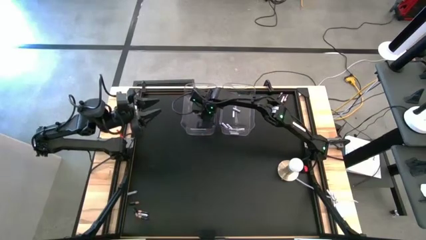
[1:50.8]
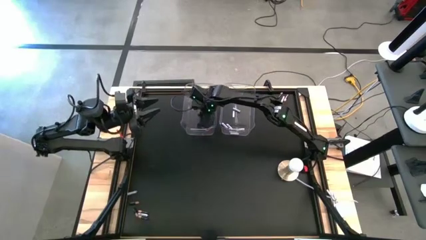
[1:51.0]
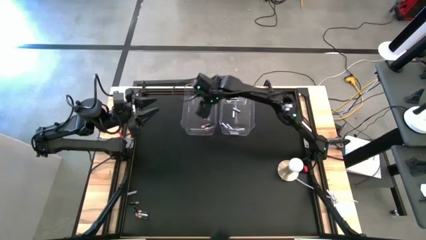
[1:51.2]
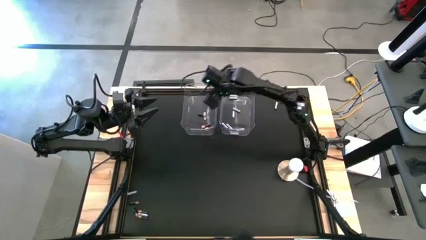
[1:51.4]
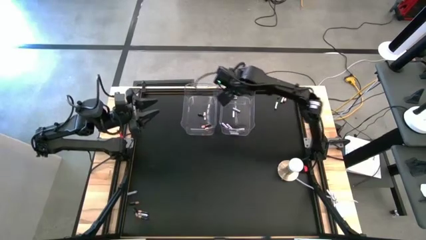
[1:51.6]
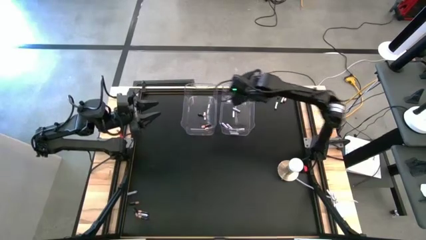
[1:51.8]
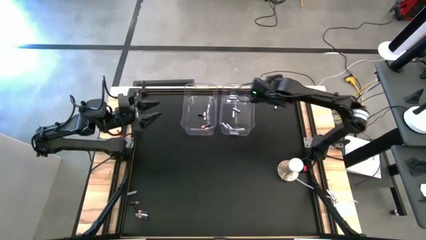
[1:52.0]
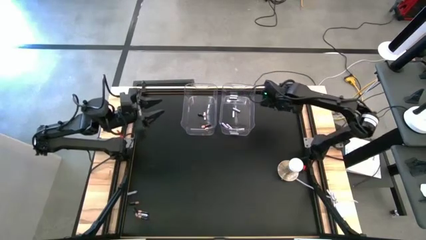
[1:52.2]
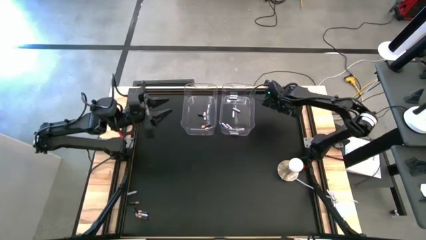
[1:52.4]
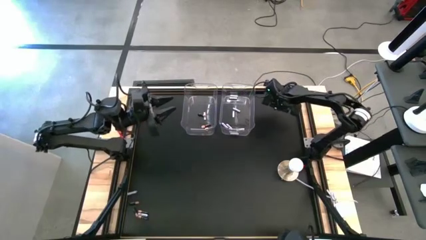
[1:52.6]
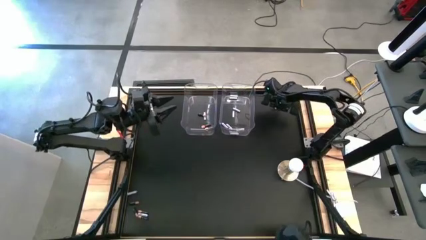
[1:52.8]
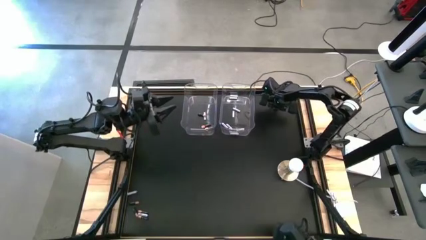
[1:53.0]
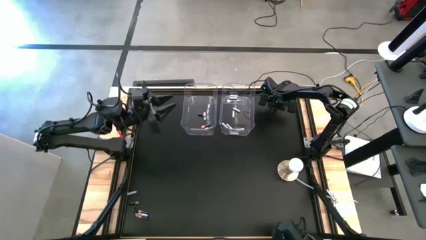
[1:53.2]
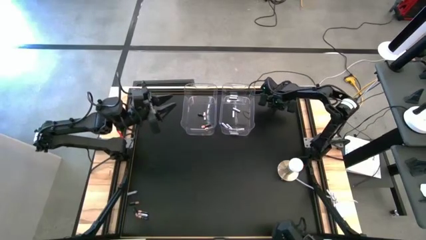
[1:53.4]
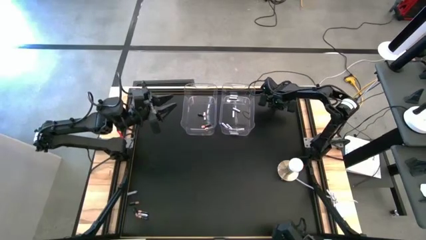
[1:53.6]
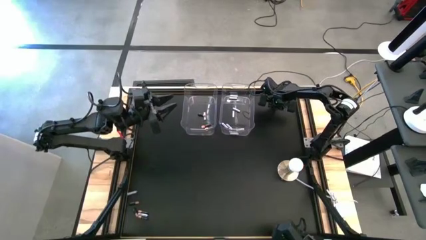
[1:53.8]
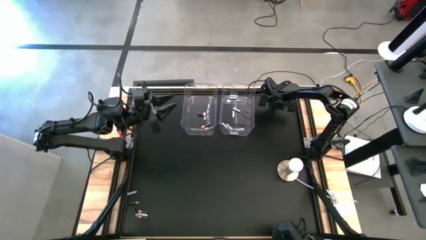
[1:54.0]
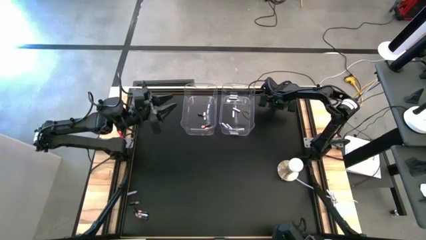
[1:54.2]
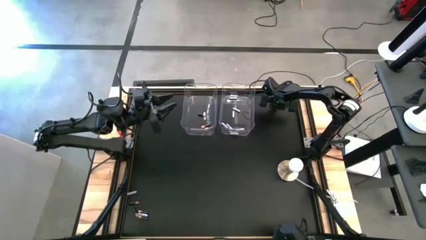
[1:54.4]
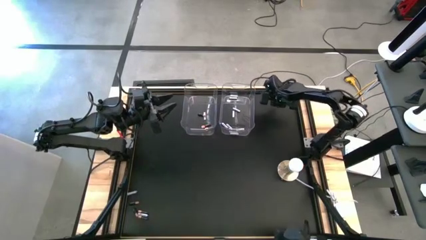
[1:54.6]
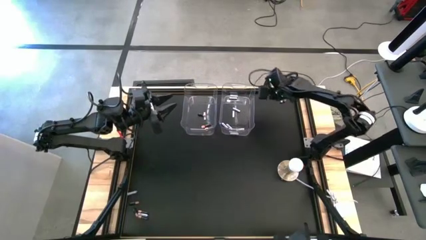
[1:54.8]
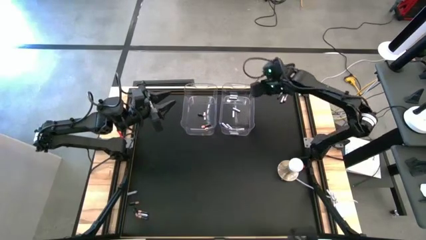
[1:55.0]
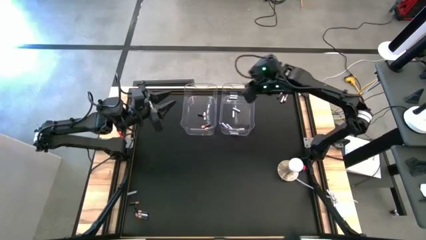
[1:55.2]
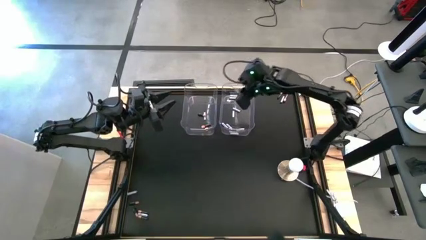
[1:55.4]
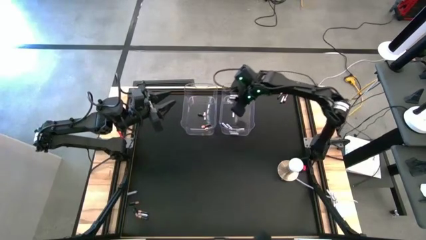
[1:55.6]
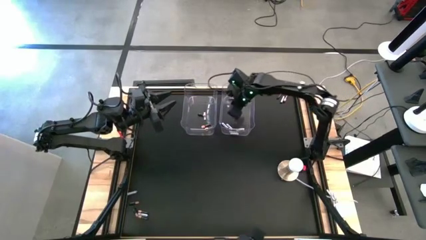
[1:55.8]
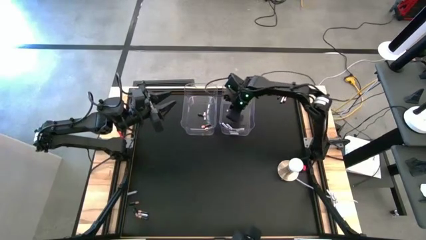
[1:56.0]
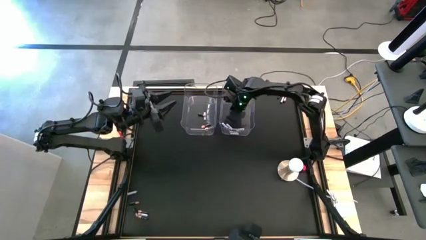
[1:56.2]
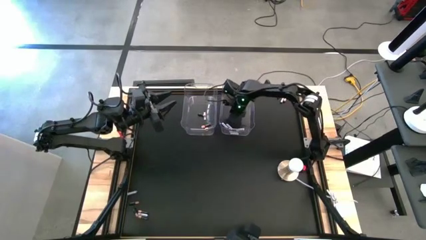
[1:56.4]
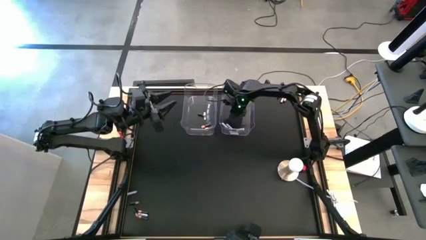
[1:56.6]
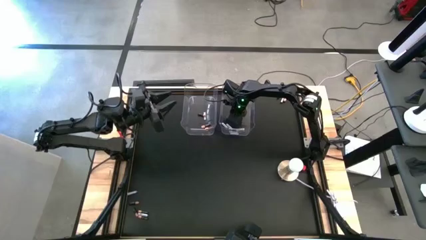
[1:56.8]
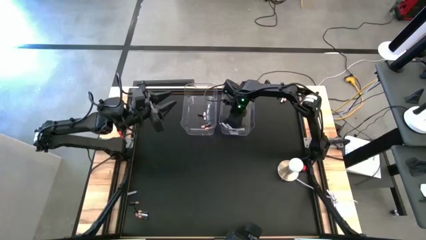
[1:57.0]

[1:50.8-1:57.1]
Task: Sort batteries
Put the white battery into the right transparent bin

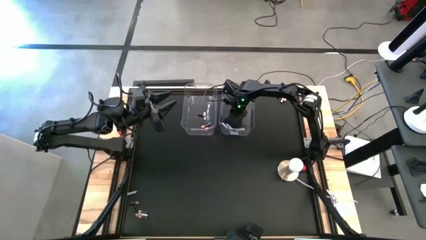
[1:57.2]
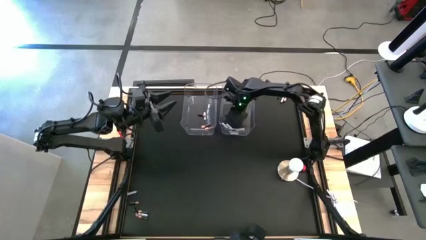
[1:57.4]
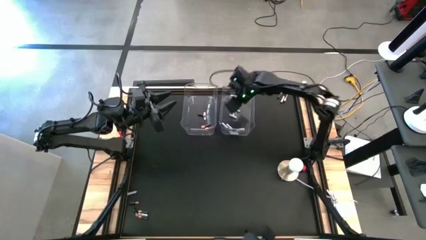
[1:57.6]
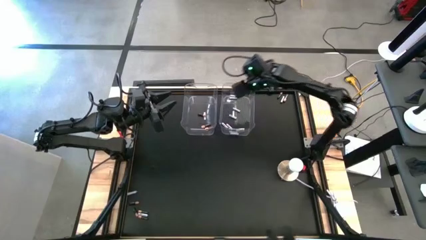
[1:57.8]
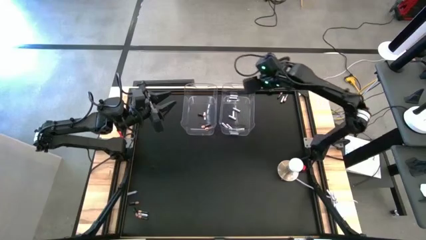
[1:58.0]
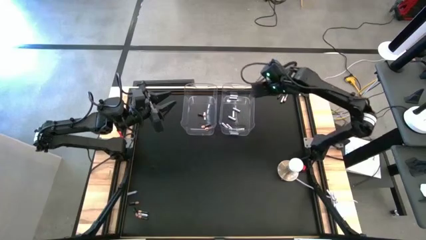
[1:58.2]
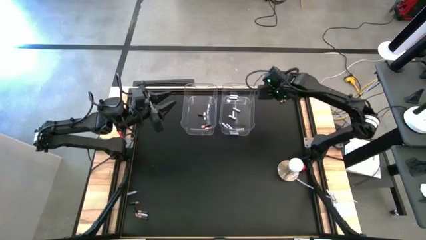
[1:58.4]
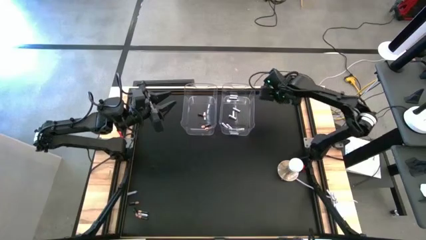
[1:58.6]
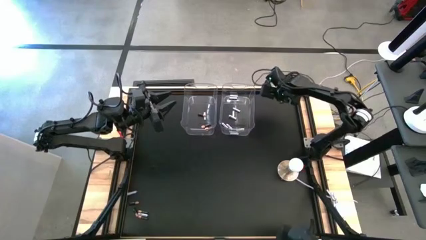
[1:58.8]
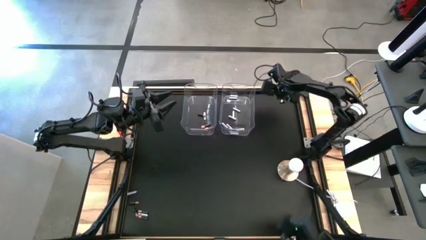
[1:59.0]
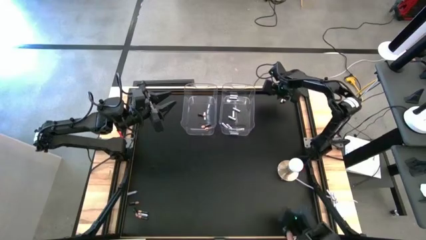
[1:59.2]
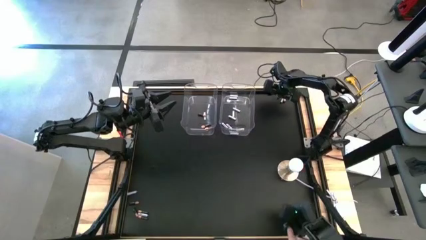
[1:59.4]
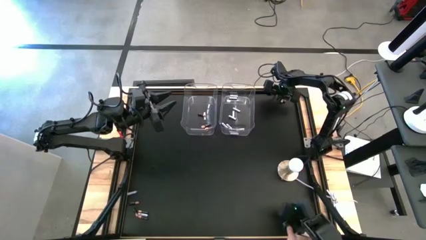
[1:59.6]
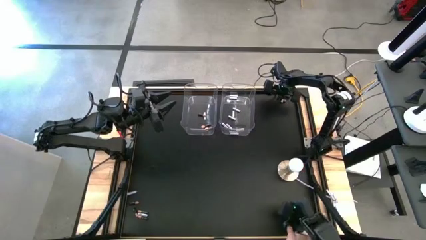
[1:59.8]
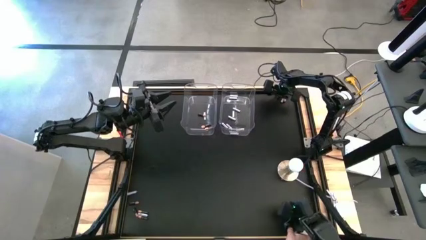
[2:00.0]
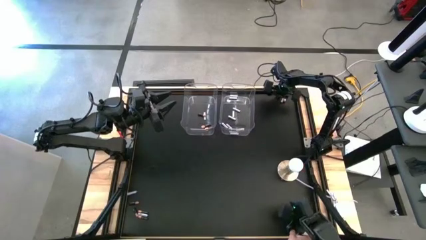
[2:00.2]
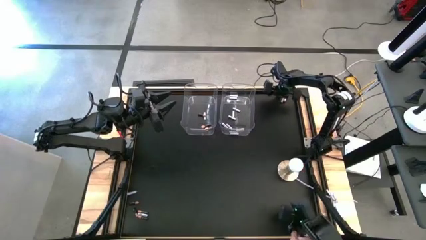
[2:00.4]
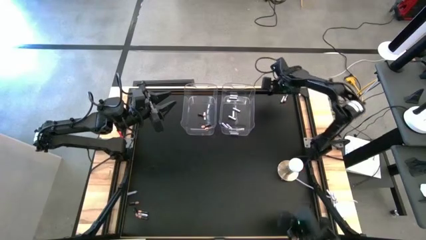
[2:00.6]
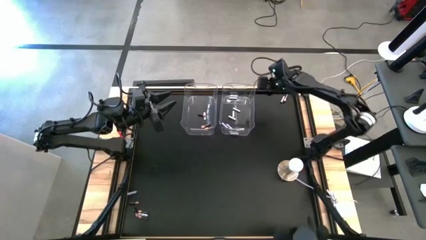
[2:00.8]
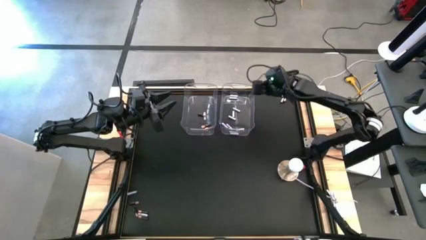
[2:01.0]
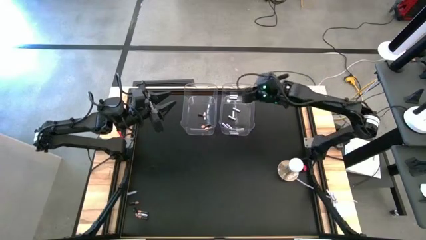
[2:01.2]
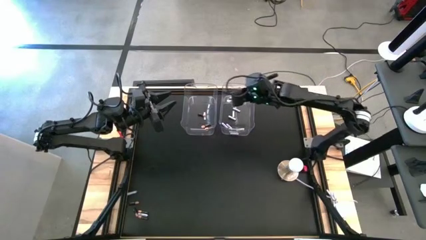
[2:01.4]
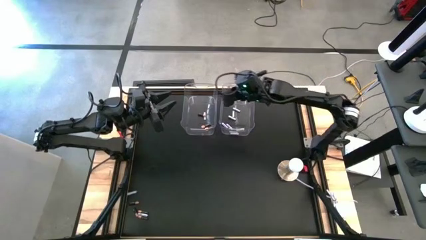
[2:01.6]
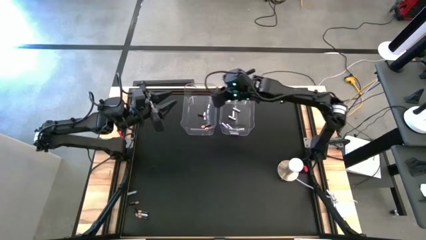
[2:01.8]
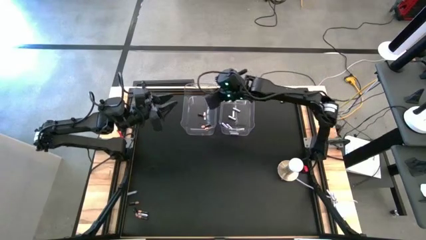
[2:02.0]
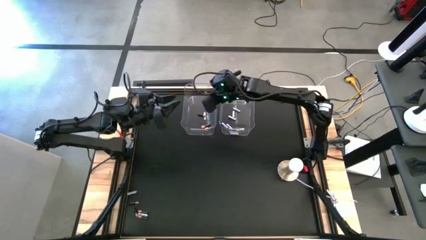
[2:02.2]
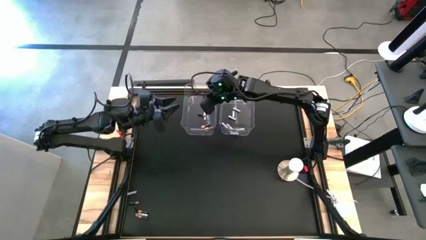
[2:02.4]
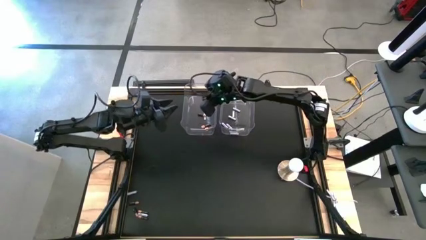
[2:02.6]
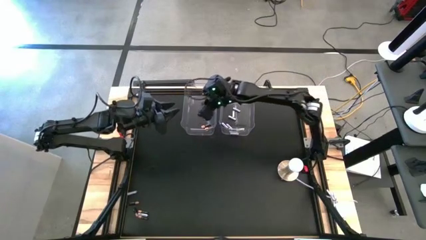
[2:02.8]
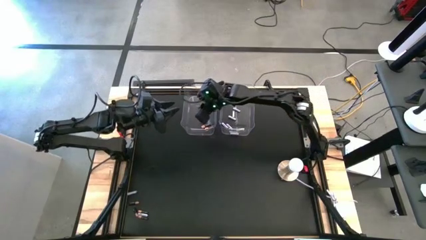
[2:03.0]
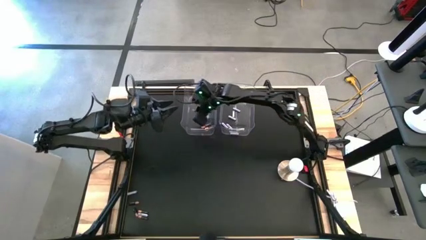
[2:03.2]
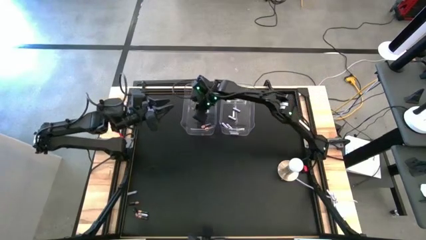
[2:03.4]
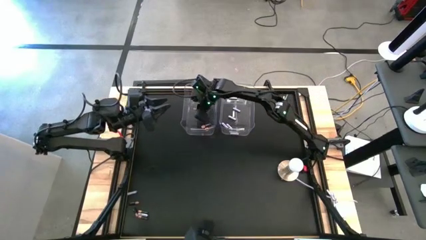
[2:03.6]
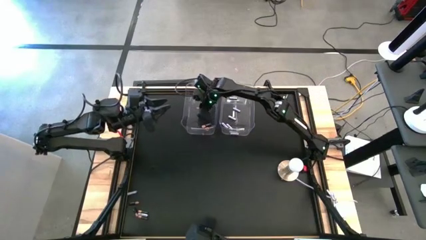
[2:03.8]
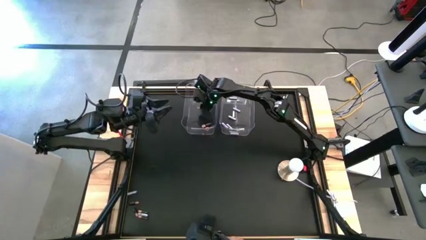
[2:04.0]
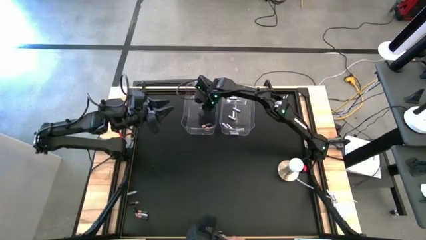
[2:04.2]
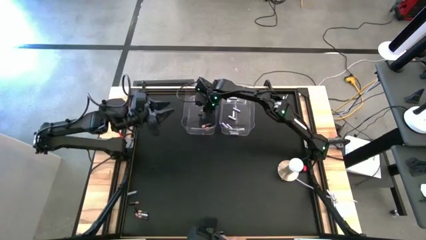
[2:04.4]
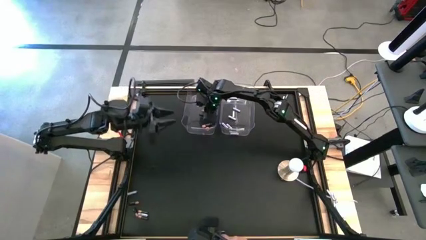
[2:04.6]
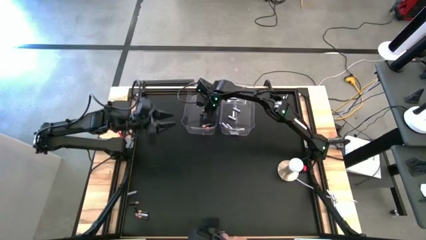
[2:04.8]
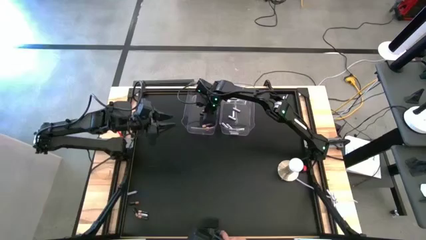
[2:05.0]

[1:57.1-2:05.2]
Put the black battery into the left transparent bin

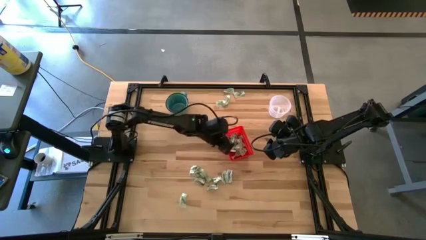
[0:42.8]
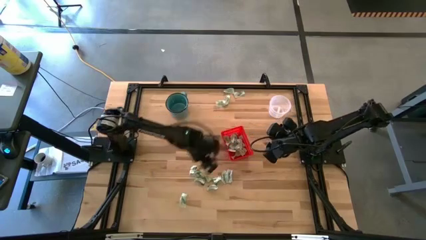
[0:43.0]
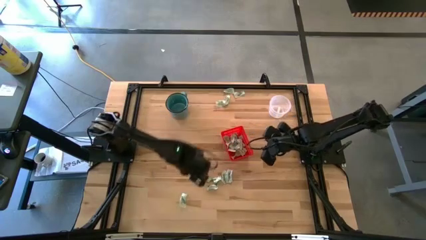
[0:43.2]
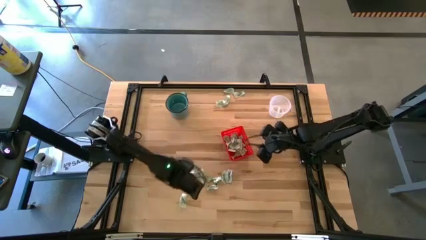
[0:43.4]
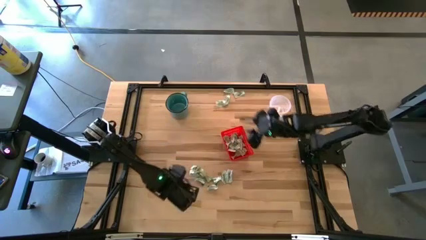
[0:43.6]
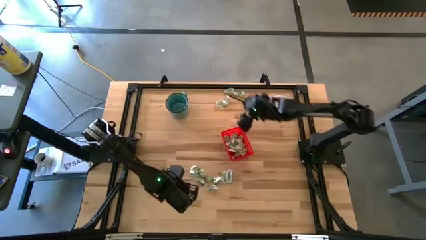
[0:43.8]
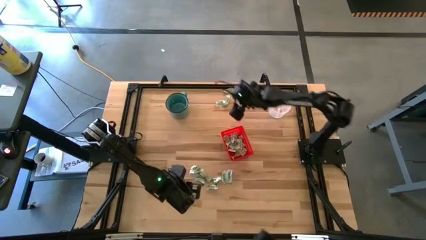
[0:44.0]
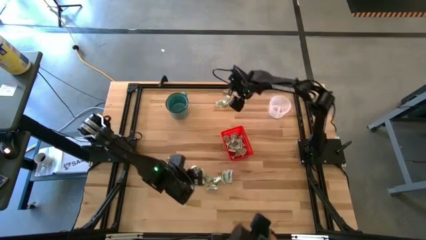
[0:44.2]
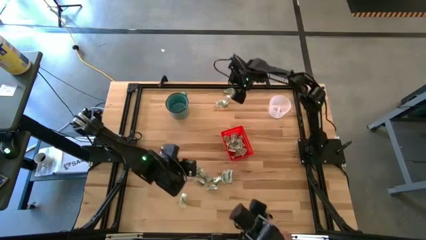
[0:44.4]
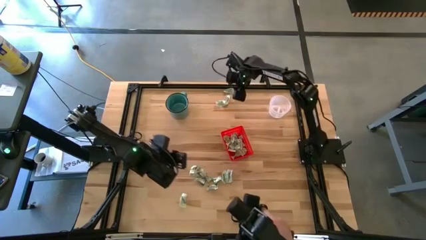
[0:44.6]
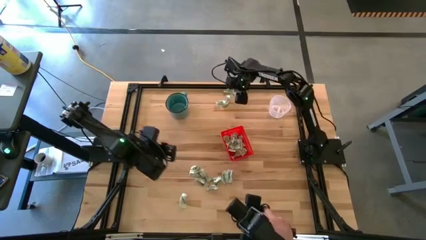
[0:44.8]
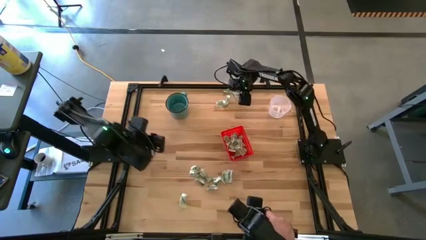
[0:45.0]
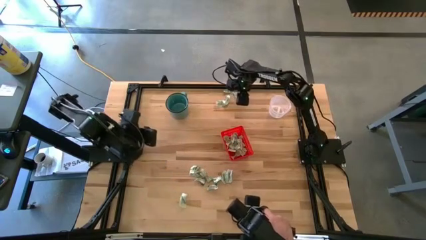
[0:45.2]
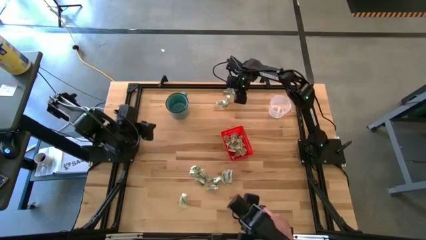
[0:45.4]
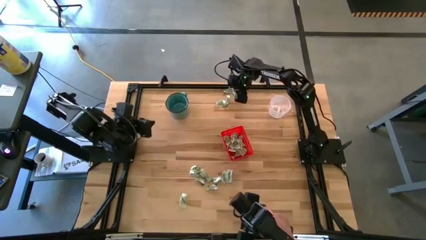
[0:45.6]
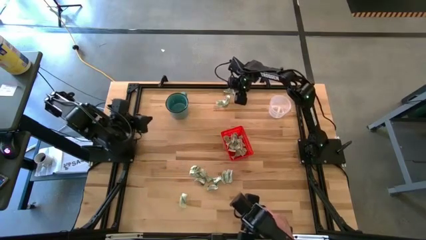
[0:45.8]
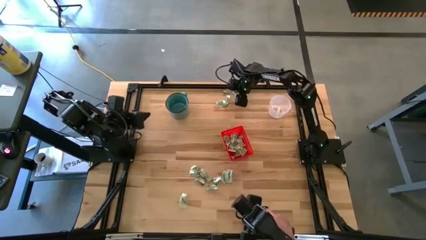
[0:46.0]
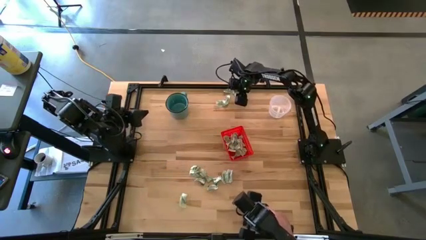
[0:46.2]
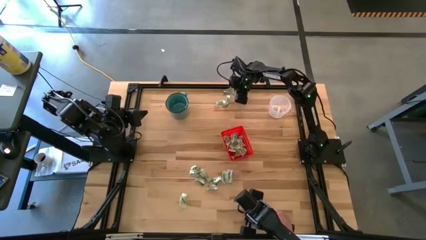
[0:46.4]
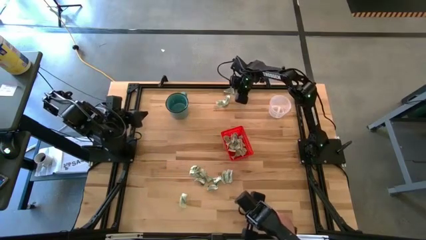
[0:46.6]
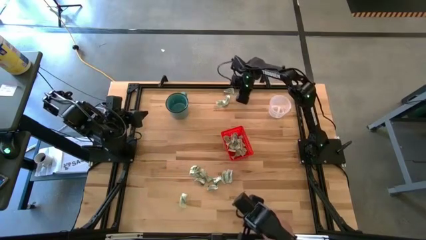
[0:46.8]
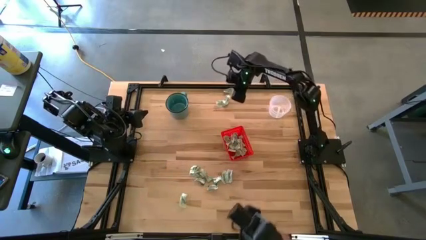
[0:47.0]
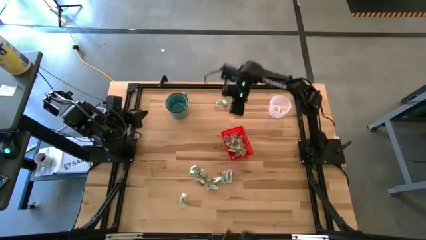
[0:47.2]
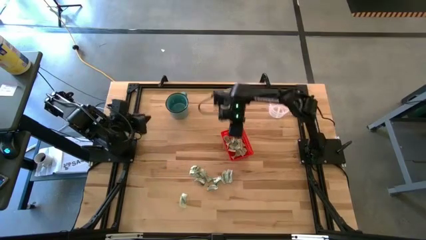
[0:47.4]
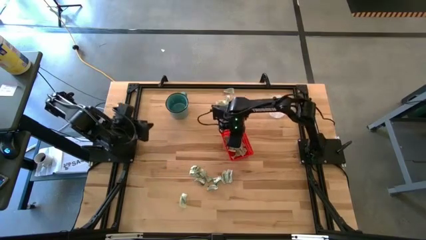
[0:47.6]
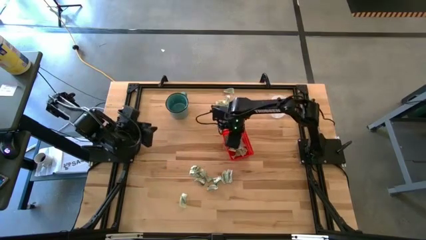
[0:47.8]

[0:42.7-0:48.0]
Task: Pick and place items into bin
Put the stevia packet into the orange bin
